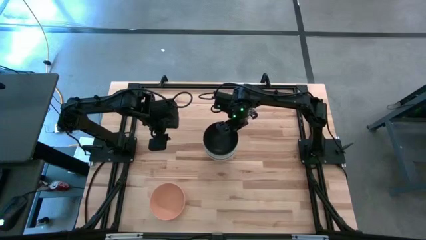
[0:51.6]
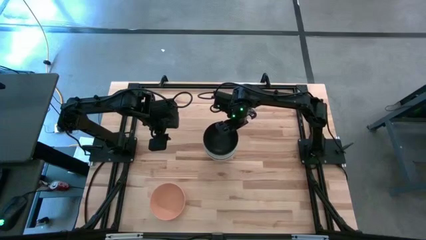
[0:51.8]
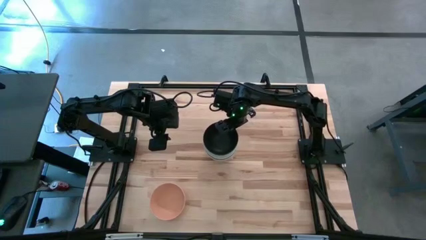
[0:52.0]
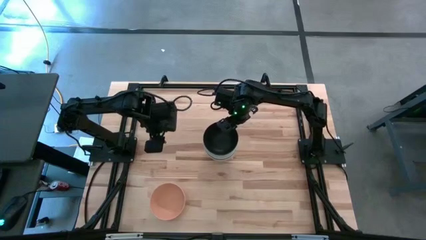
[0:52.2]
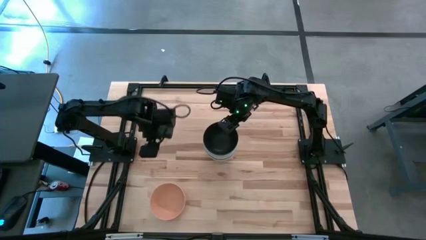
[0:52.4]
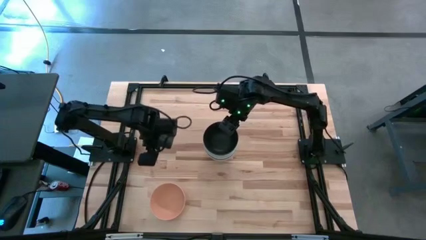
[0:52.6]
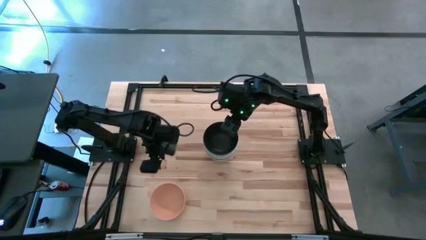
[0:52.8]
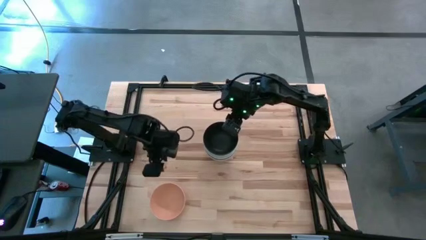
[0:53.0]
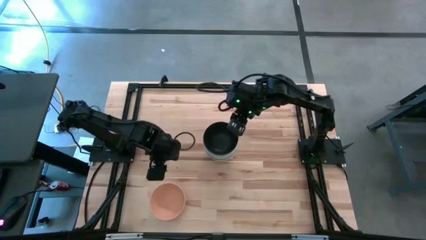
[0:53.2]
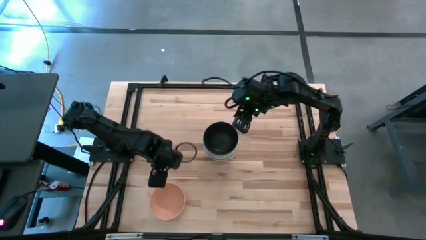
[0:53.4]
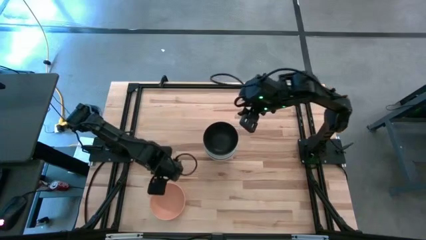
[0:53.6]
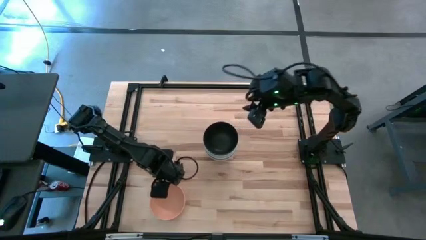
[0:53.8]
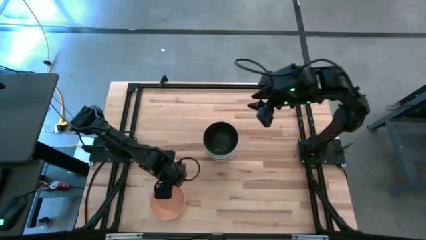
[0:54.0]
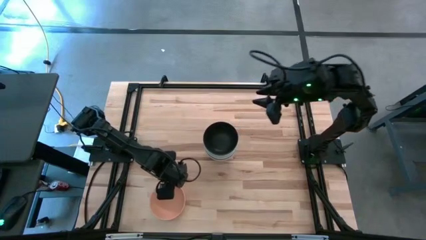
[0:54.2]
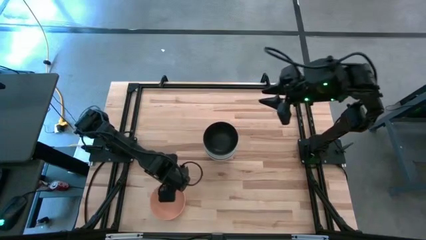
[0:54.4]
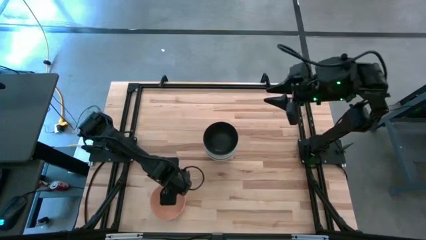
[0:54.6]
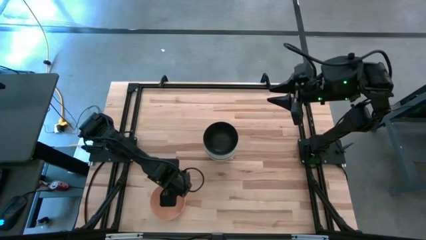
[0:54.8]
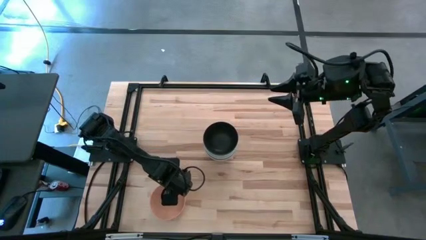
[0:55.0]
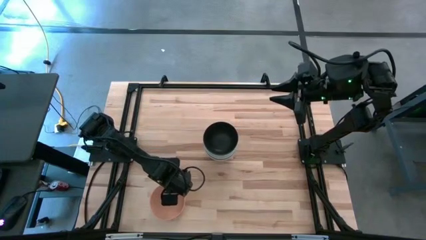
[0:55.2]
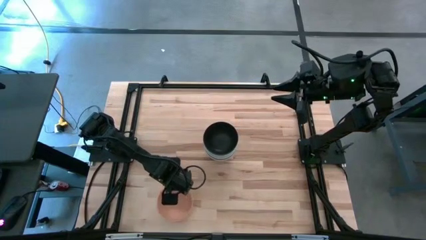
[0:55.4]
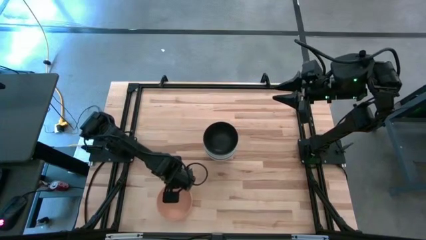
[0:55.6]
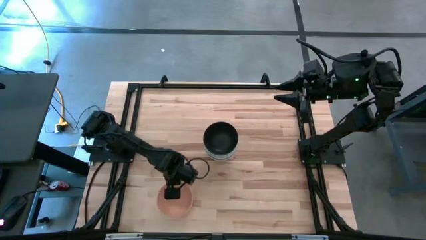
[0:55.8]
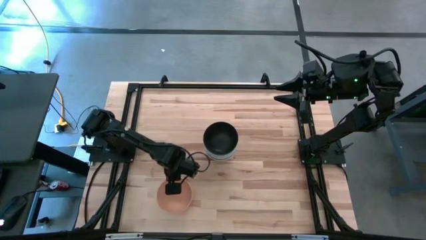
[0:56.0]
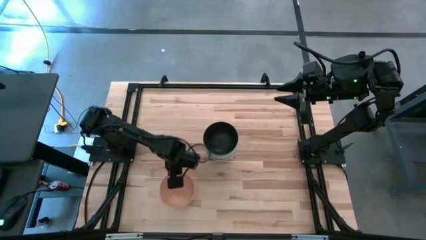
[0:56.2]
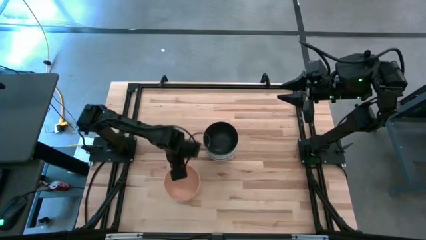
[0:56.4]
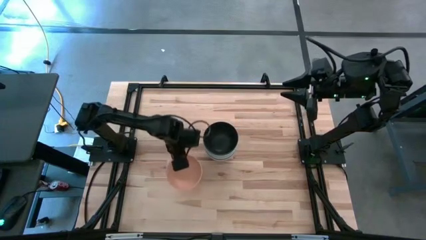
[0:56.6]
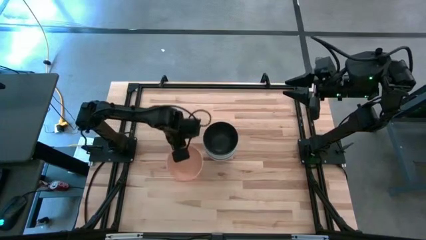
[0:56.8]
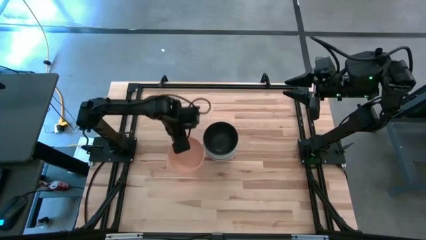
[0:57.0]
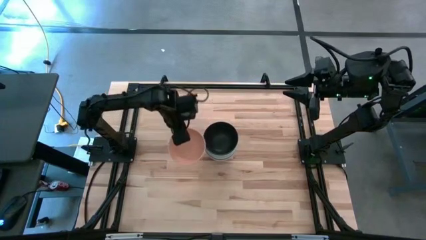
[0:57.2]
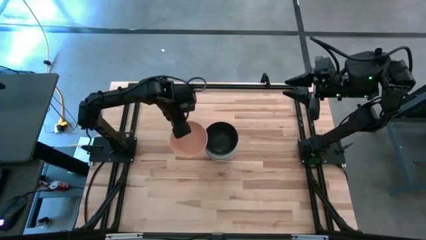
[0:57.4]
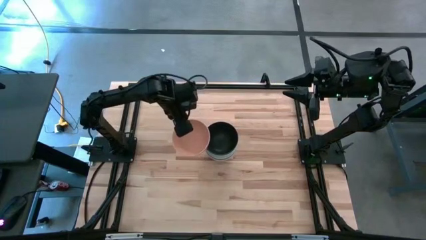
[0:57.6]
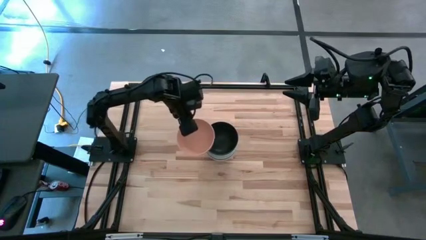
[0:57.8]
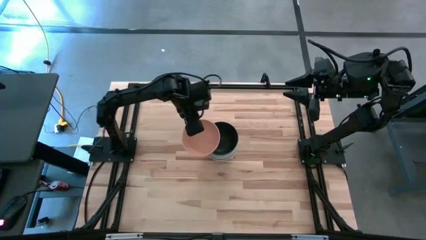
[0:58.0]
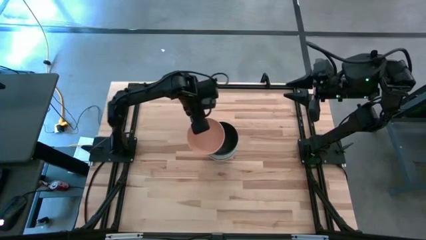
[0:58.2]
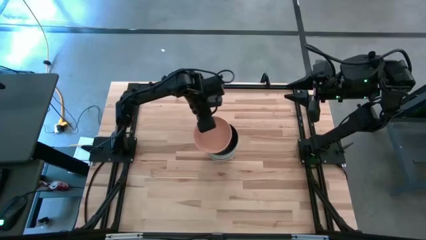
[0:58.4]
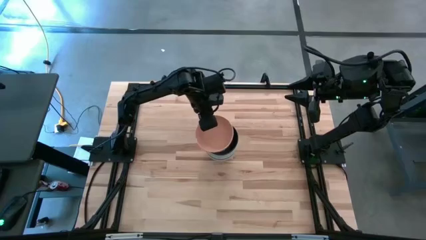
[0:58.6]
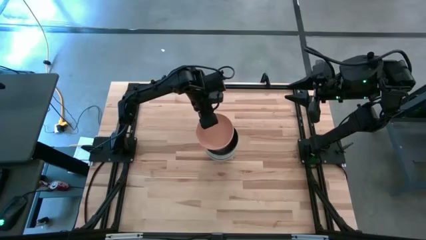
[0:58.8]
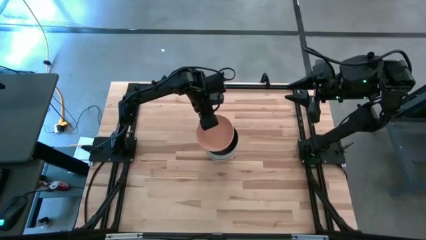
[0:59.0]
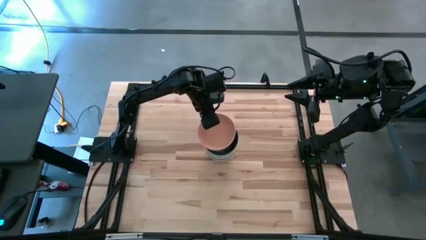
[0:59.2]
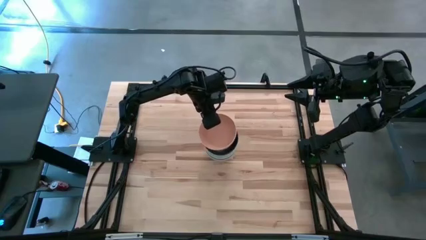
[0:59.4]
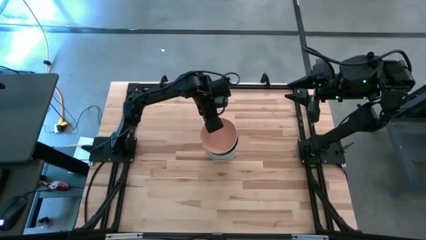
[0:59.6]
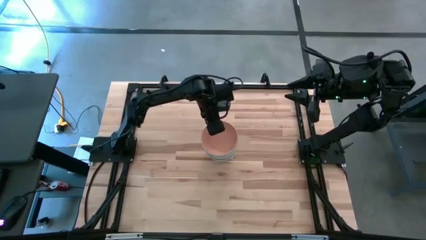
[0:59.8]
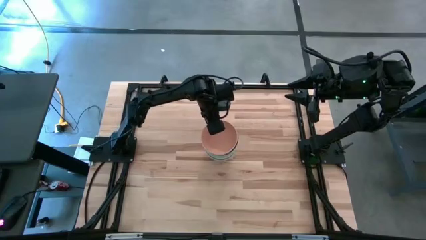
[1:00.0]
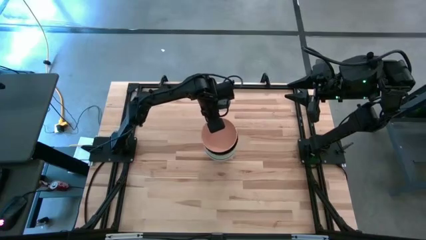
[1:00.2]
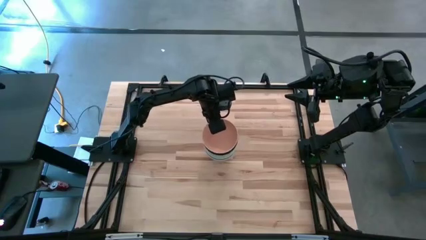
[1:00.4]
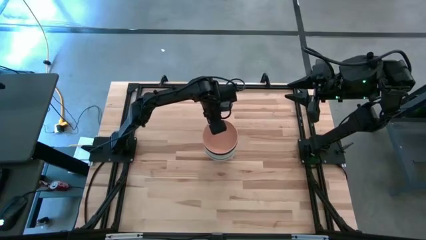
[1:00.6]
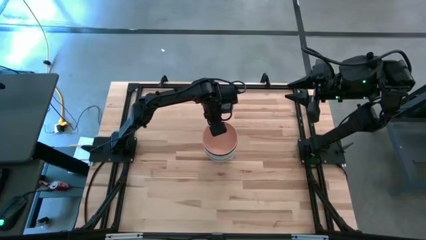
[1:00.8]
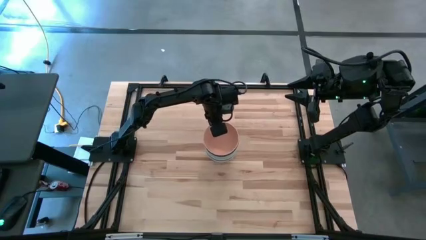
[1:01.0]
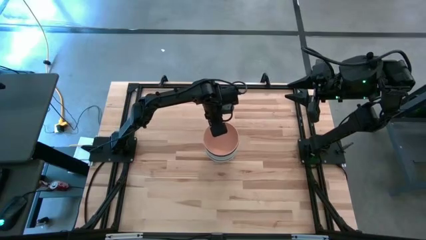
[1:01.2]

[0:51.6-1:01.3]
Task: Nest bowls inside each other
Stack the orange bowl on the black bowl

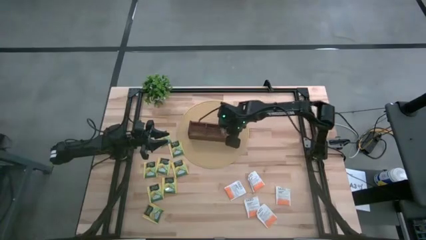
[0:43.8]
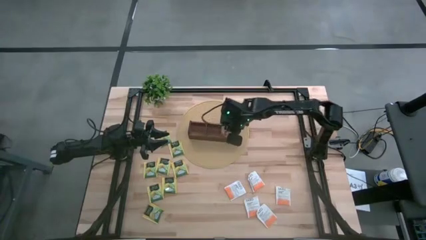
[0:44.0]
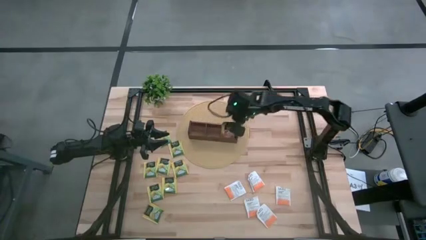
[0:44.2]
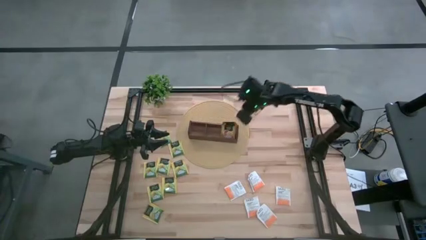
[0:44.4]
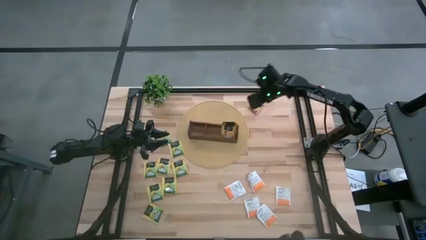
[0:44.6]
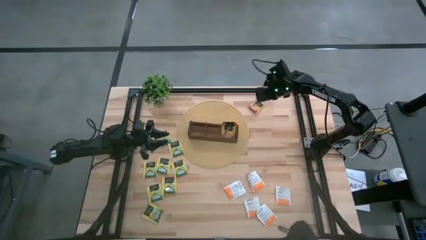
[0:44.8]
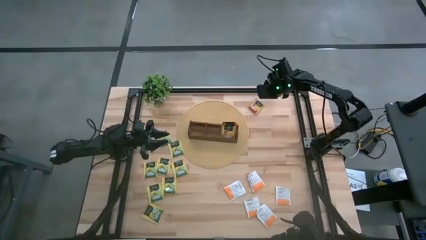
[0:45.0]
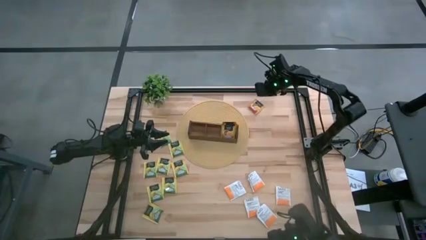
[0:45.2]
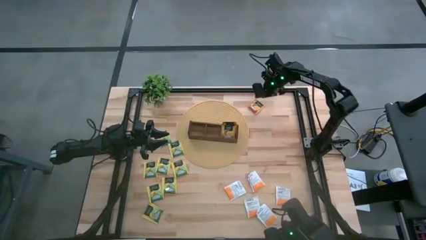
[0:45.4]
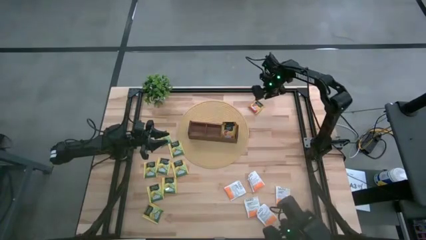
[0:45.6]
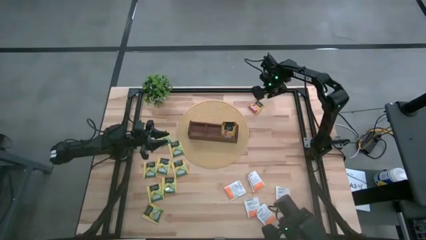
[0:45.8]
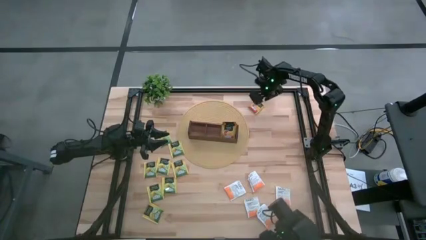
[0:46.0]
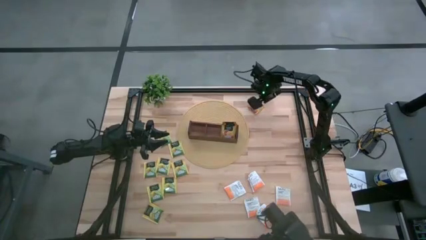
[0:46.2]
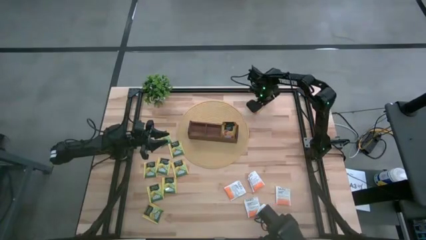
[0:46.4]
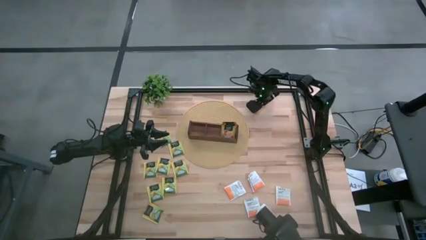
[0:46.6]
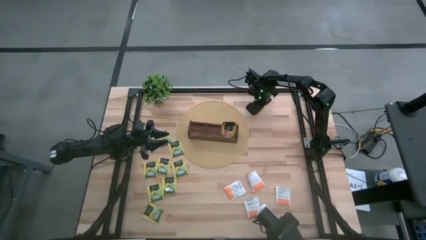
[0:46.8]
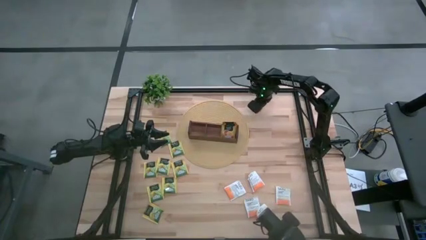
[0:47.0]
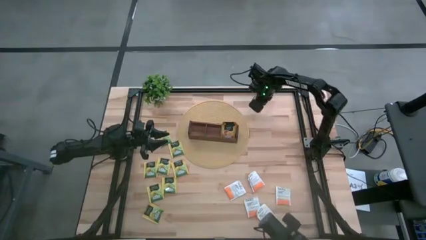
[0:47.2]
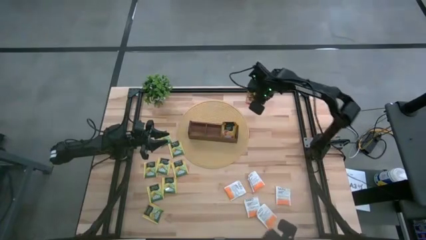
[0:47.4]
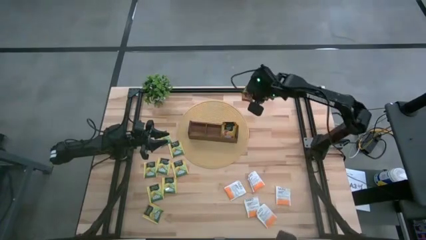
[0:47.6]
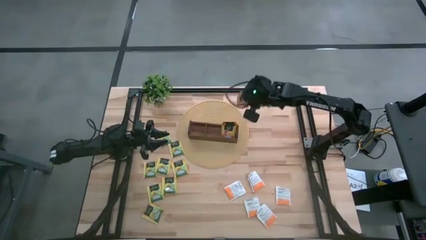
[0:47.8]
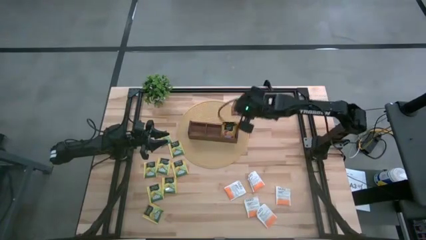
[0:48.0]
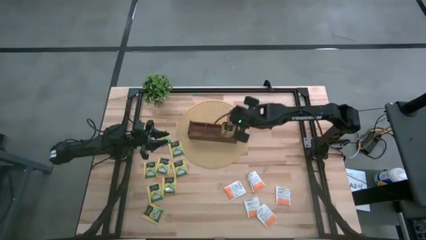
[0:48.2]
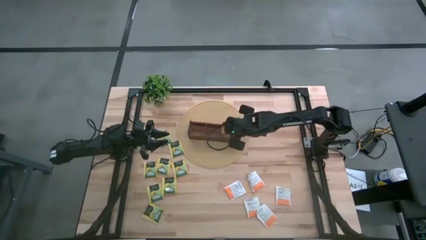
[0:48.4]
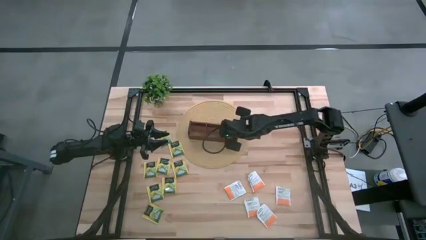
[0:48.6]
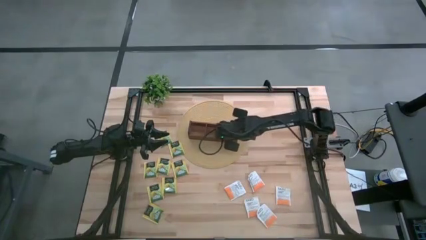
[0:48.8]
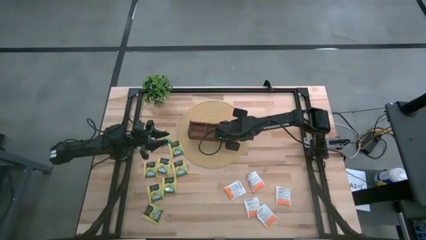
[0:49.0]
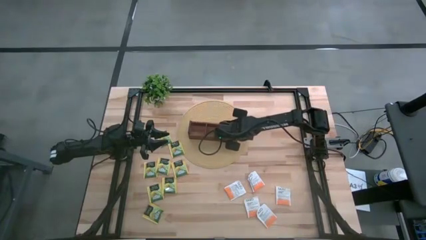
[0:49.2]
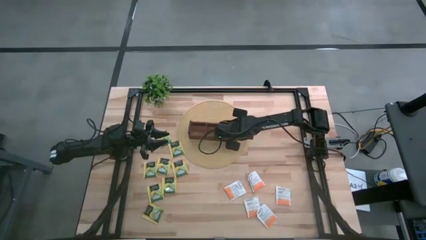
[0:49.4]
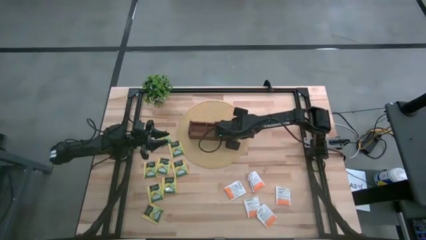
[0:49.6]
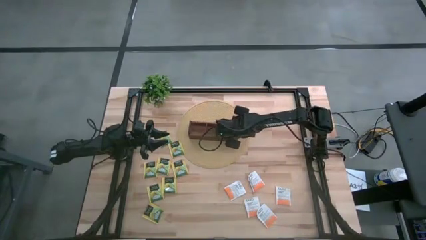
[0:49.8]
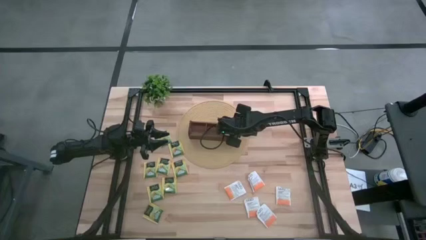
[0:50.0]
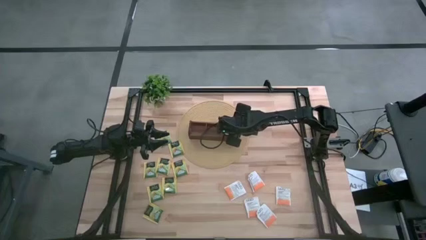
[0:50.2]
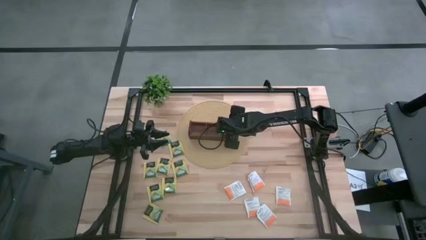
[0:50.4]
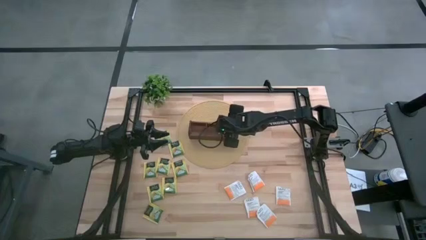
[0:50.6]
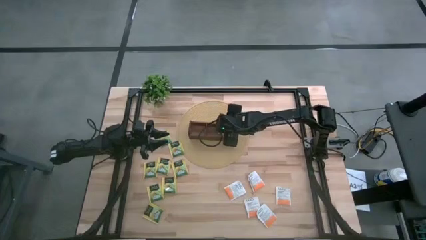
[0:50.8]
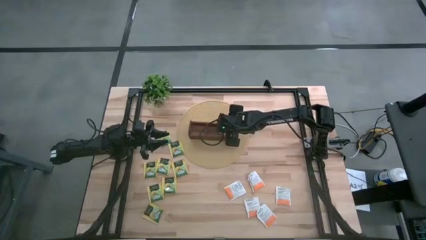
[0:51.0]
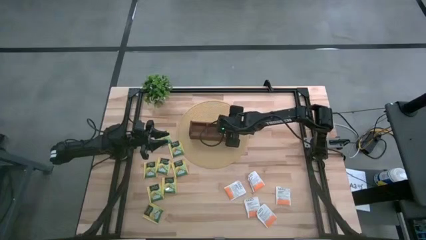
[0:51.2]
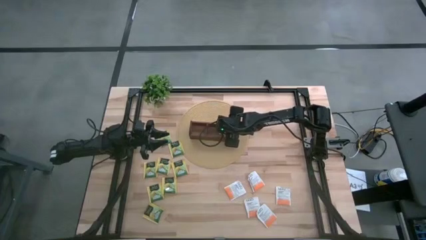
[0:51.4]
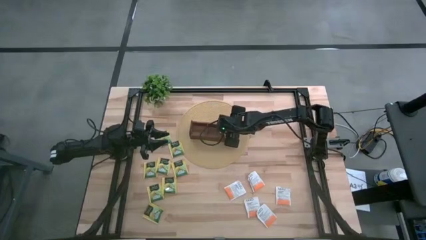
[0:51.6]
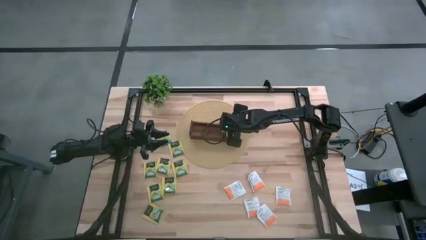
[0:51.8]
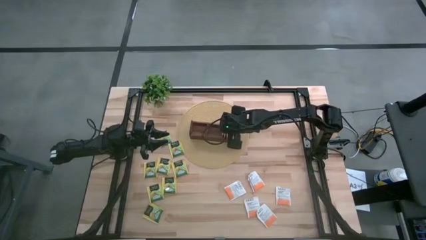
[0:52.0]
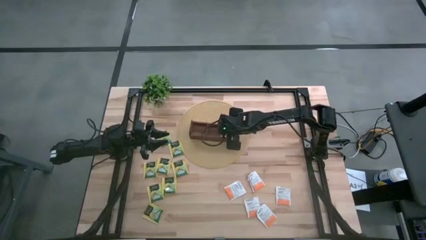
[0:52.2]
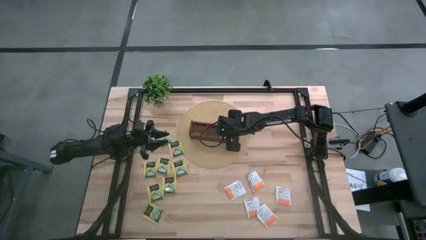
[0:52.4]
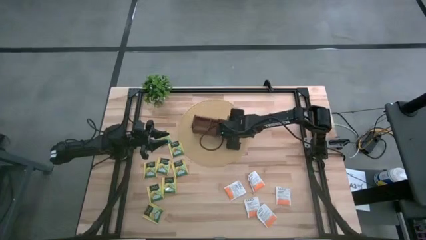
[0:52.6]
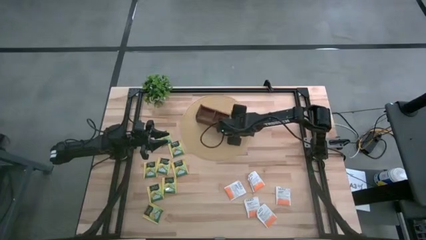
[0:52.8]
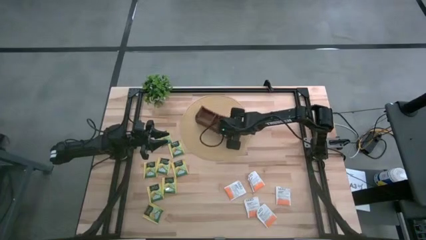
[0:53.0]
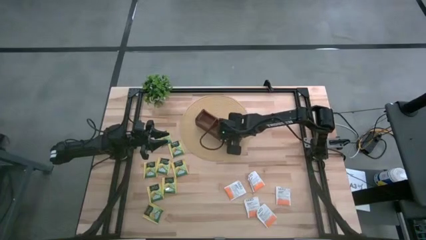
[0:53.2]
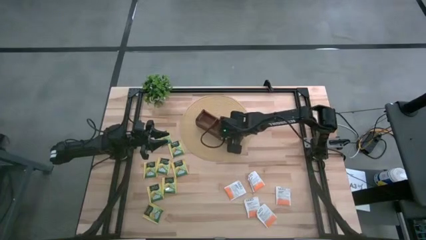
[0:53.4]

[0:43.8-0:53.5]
Task: Pick & Place Tea
Put the dark yellow tea bag into the right section of the wooden organizer
